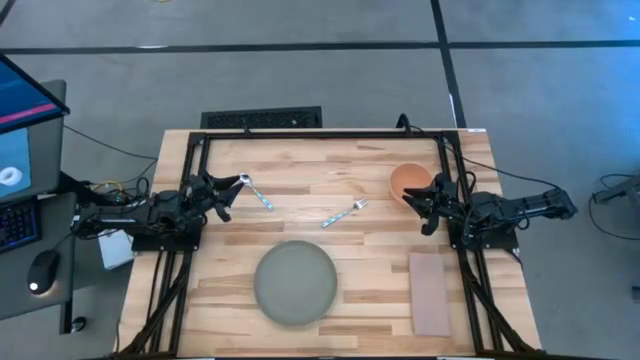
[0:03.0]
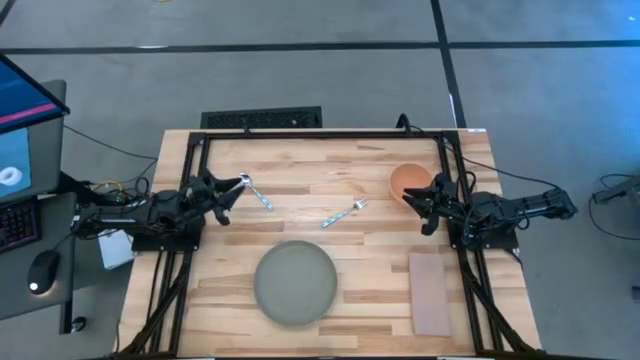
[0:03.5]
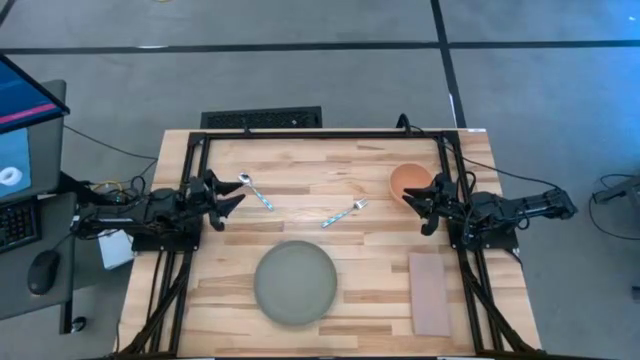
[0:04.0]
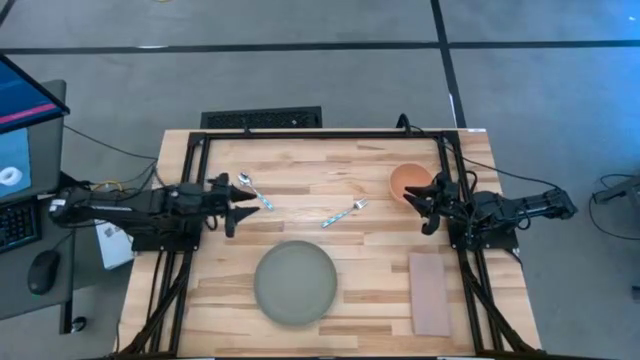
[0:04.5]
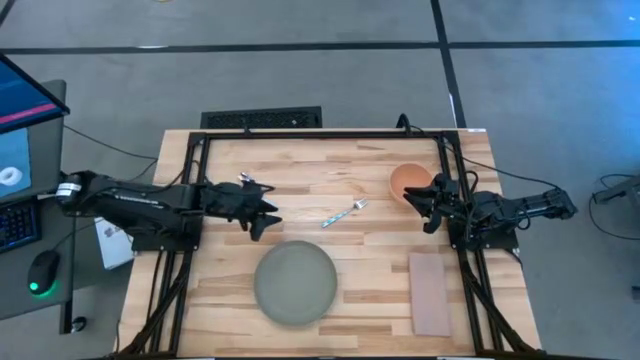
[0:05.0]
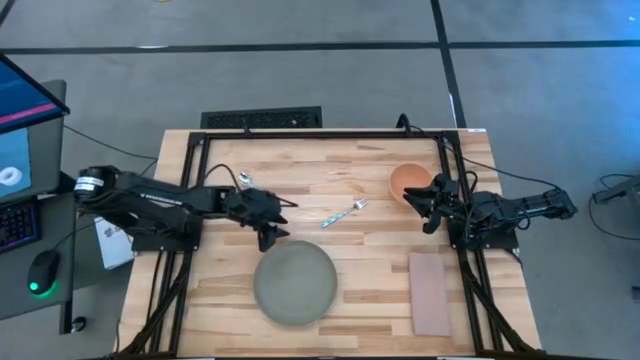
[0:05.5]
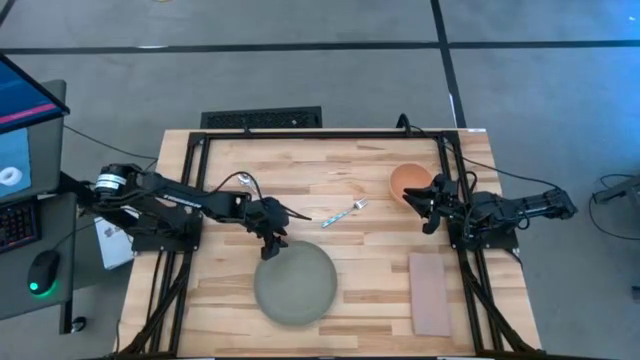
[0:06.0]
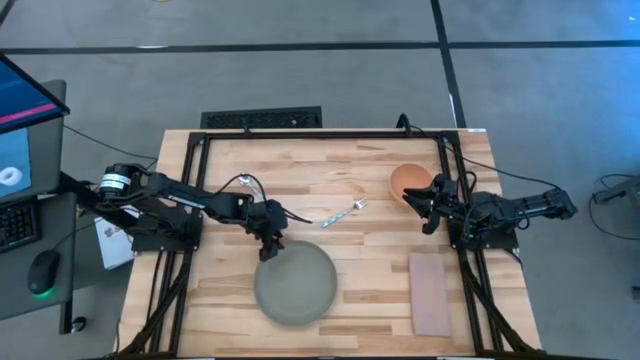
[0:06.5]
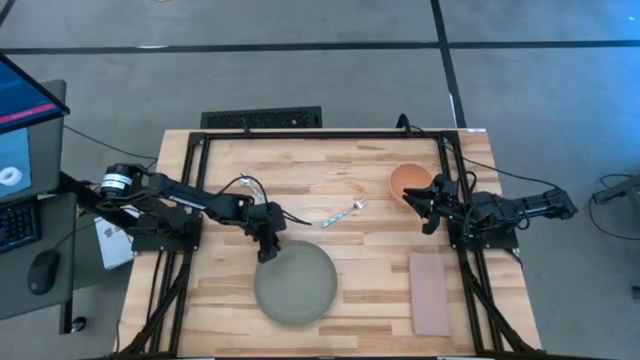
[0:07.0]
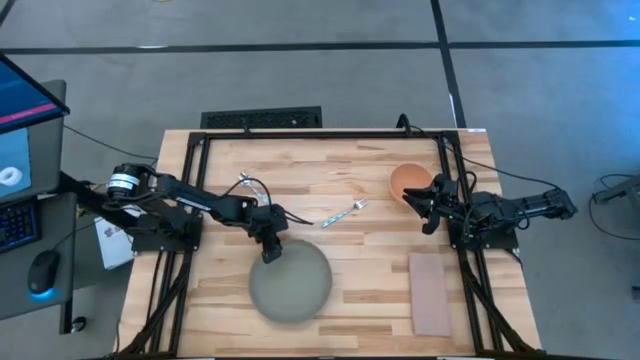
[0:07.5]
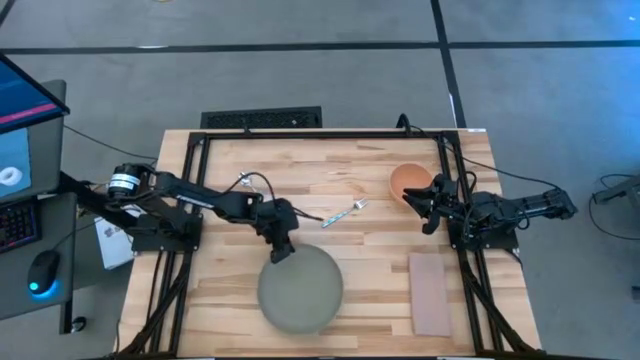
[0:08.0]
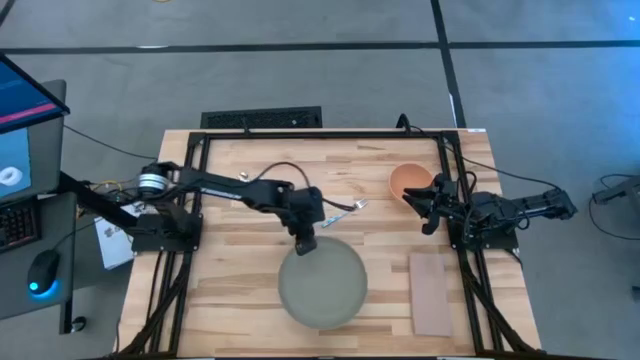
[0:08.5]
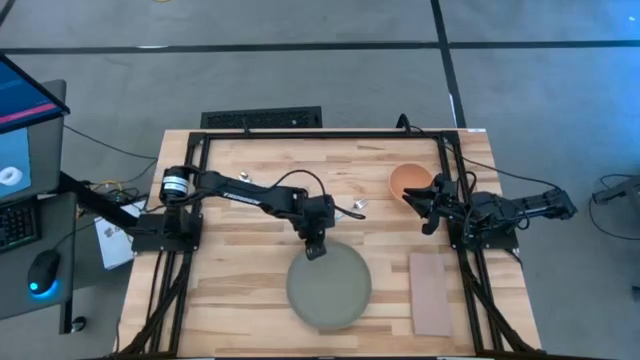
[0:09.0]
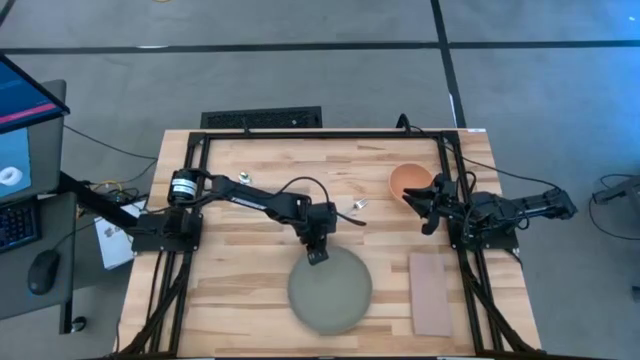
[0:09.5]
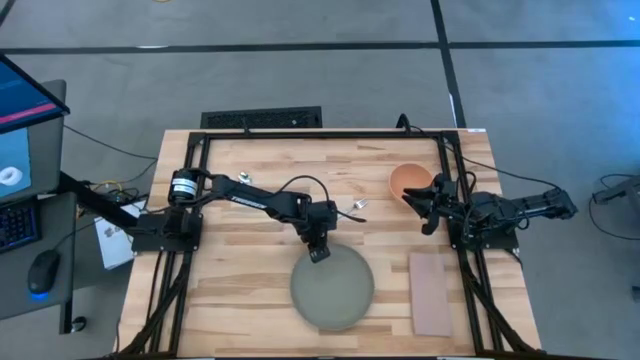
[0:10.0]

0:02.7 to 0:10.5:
Task: Set table place
Move the gray plate to the center of the table

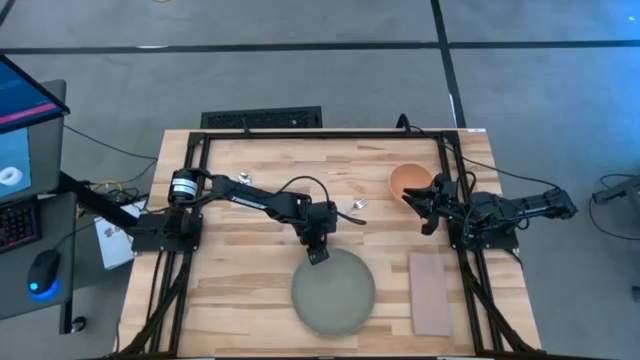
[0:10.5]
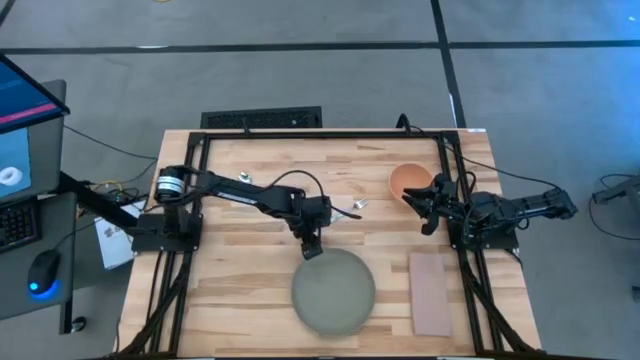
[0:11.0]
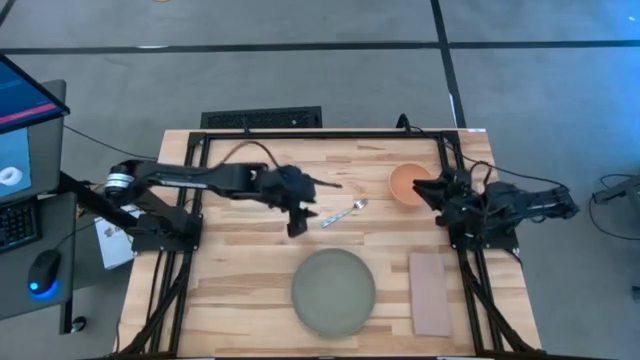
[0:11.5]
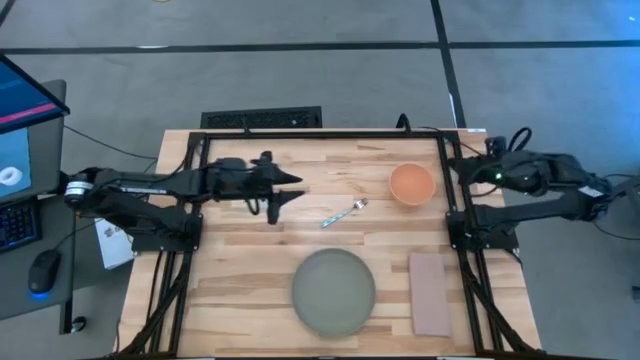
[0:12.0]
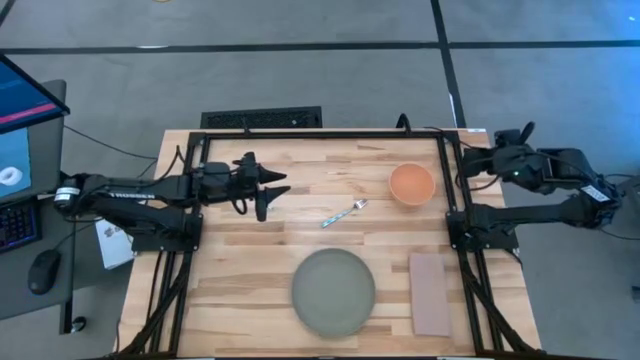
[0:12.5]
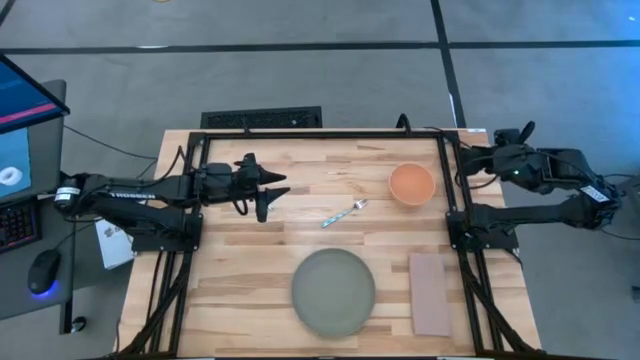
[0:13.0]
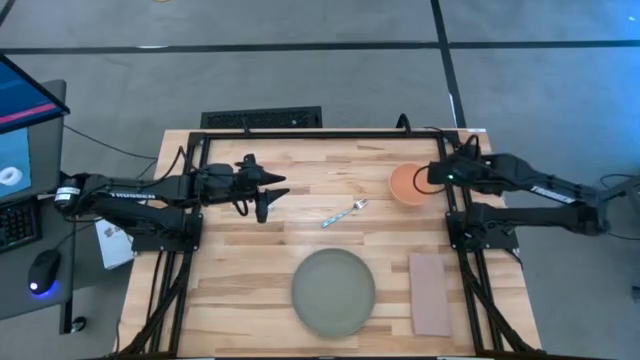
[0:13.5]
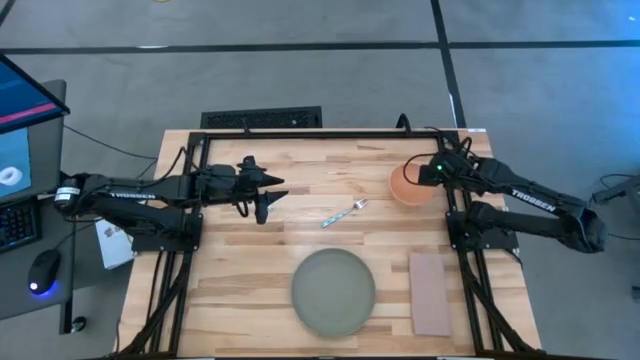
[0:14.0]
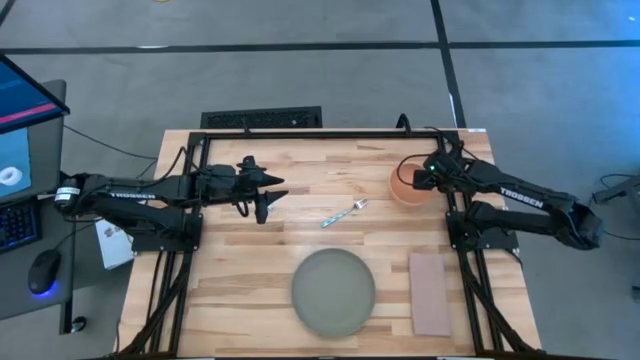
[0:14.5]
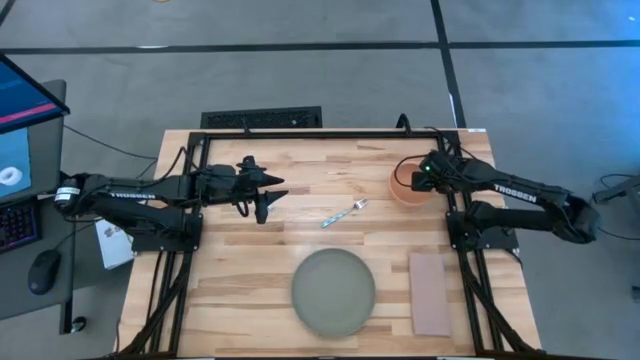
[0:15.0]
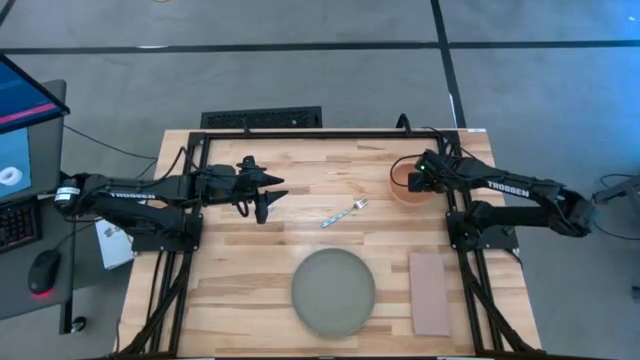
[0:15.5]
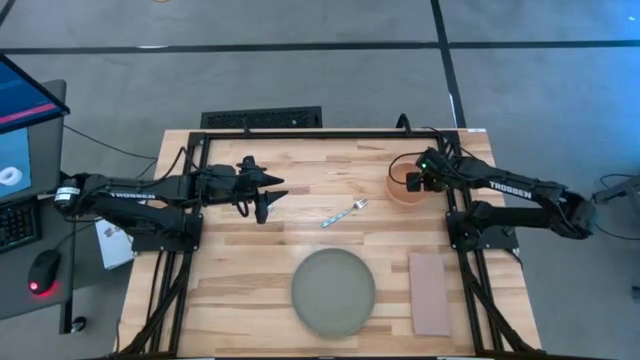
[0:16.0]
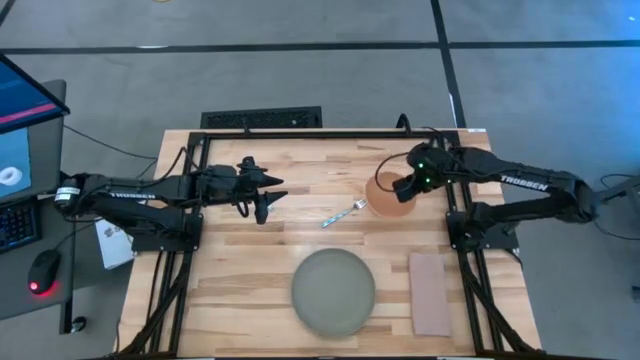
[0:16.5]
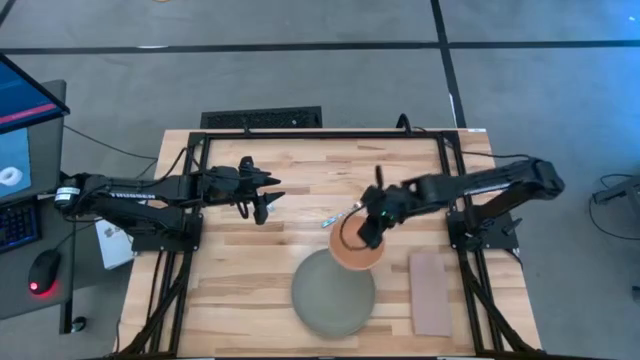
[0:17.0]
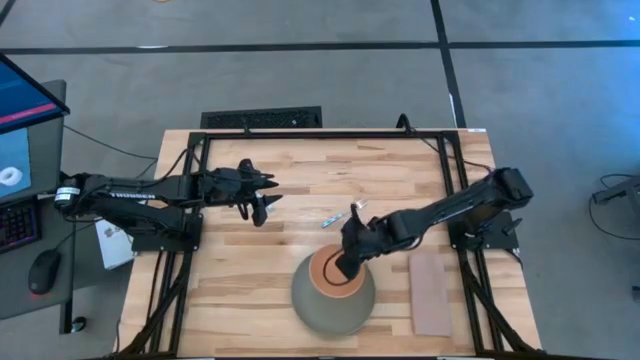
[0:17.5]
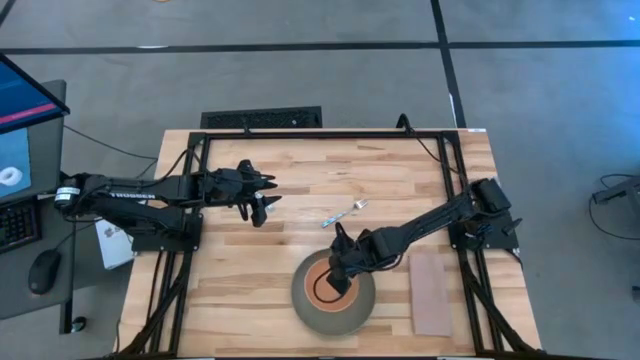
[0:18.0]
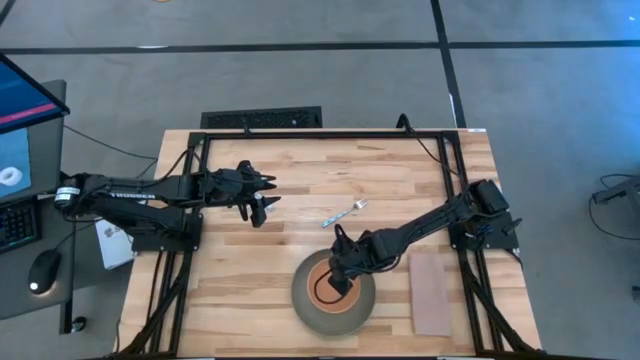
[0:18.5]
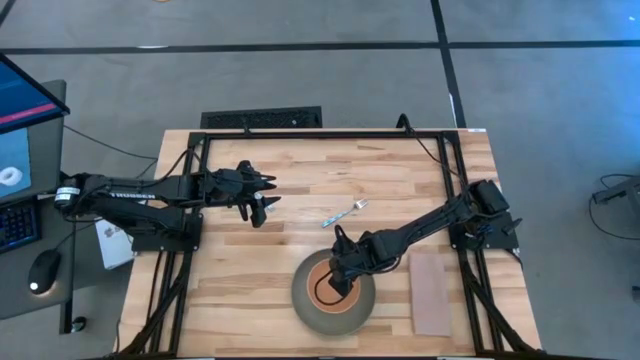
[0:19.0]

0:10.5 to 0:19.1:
Put the brown bowl on top of the gray plate on the table

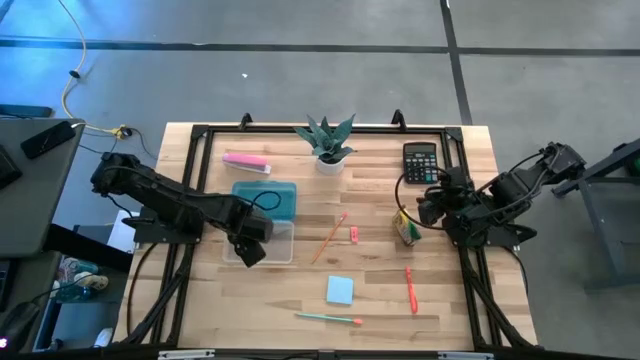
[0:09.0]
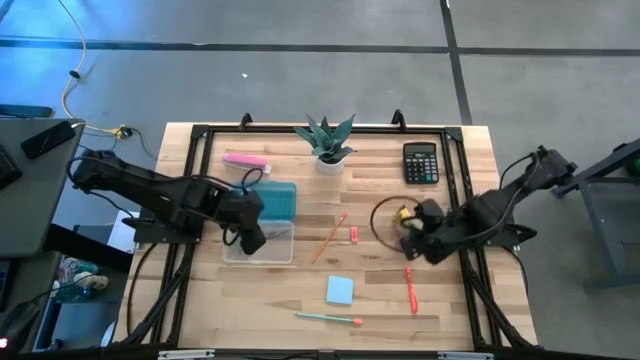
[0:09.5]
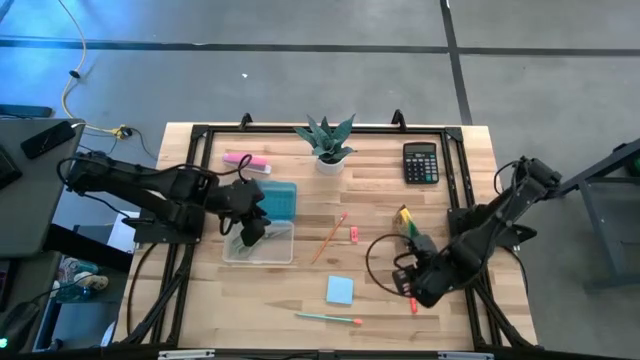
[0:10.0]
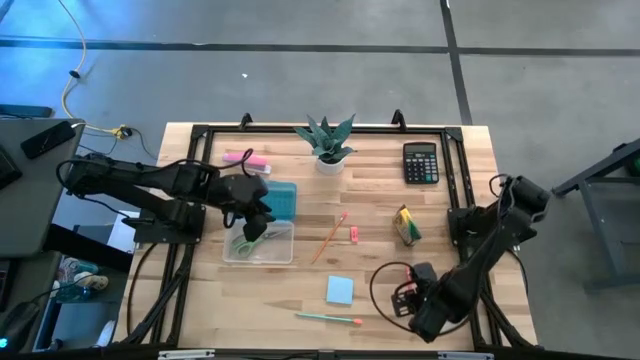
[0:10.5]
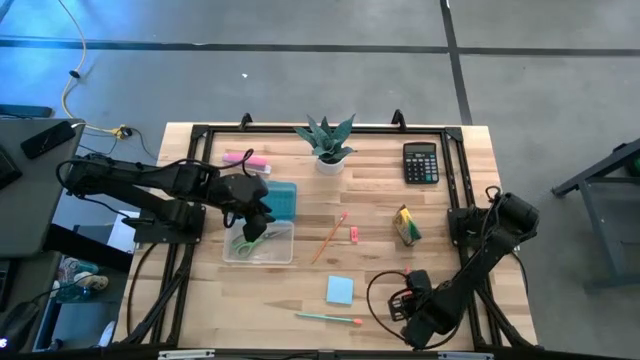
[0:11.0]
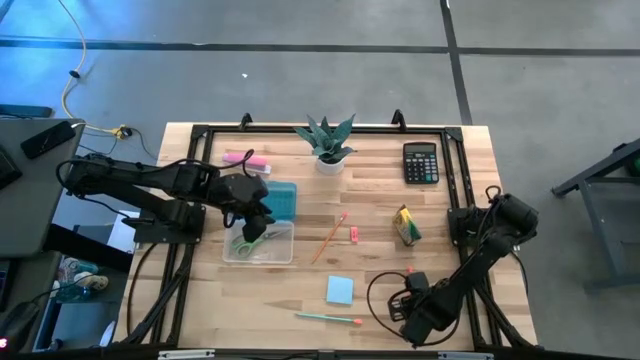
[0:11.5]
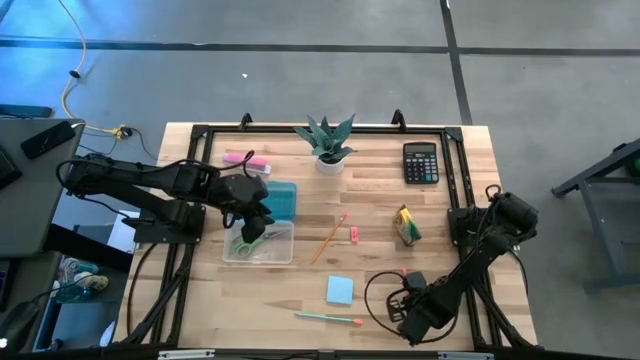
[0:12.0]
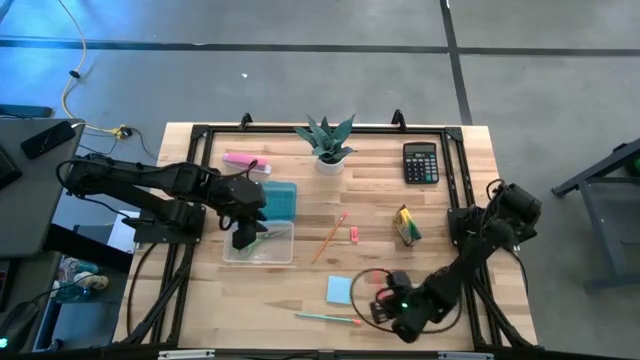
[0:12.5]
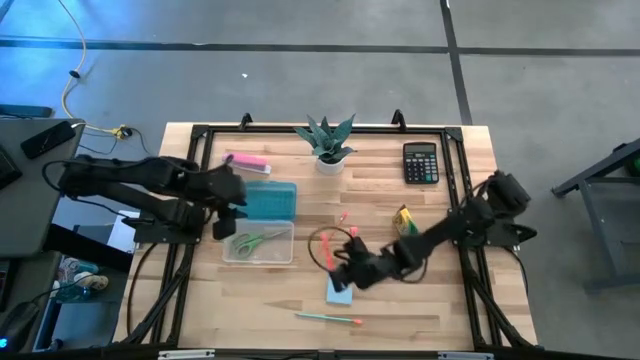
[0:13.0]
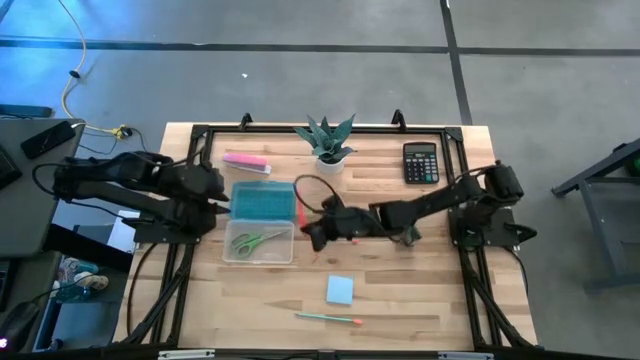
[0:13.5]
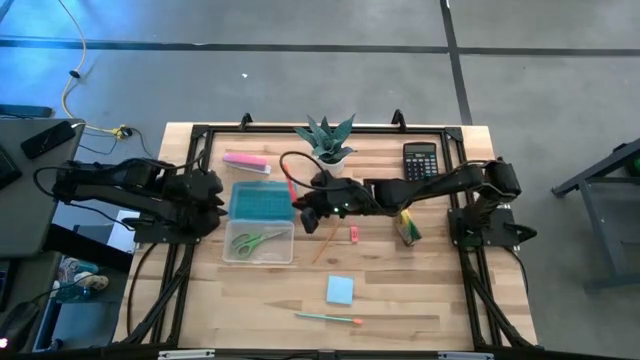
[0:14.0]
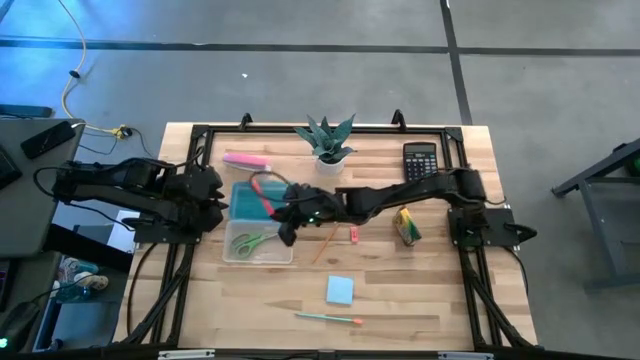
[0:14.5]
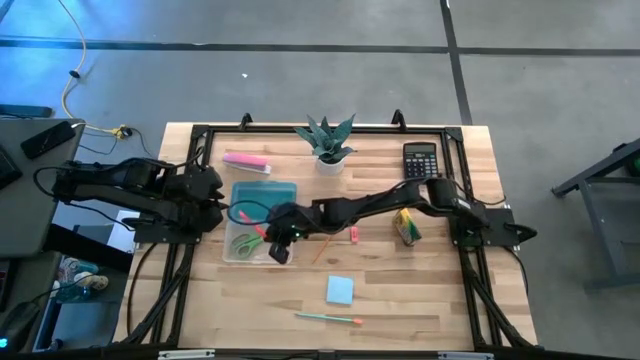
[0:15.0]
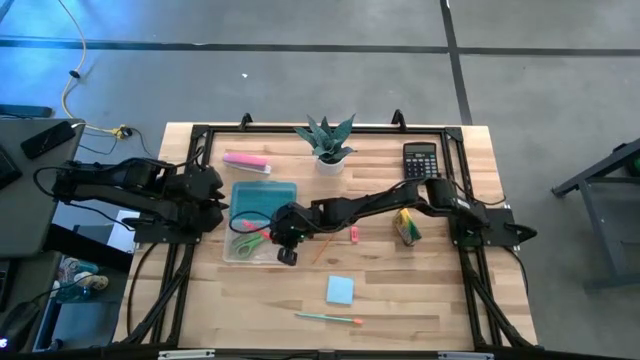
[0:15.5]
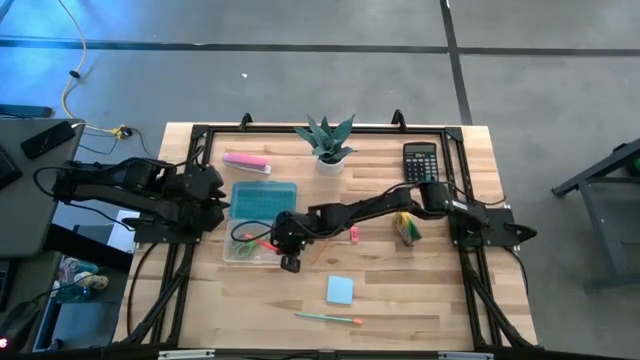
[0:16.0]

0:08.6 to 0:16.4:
Task: Pack school essentials
Put the orange pen into the blue supply box
